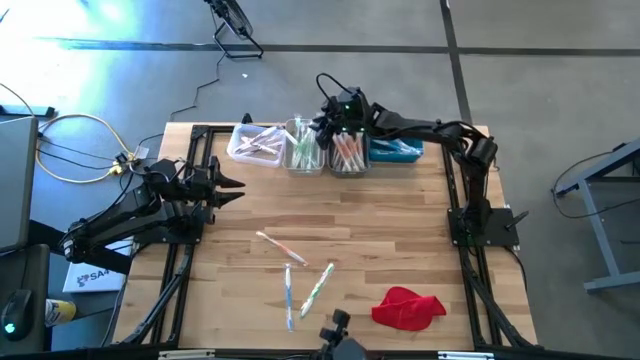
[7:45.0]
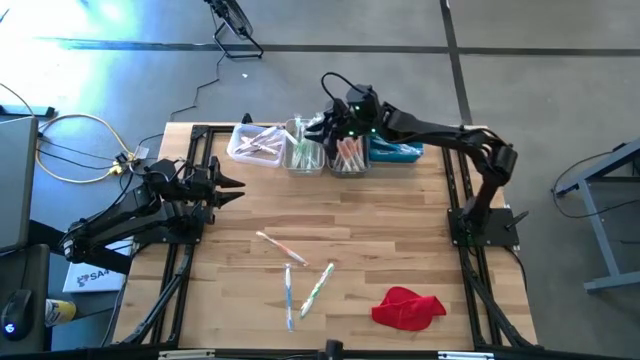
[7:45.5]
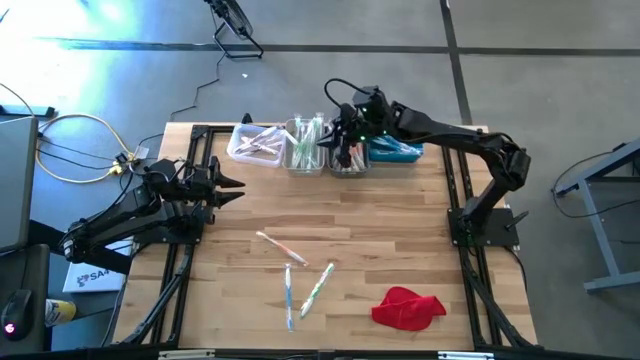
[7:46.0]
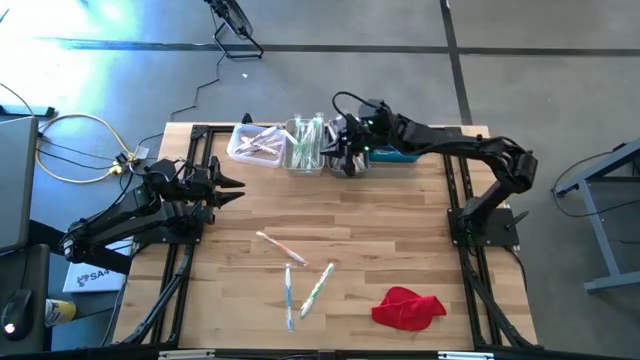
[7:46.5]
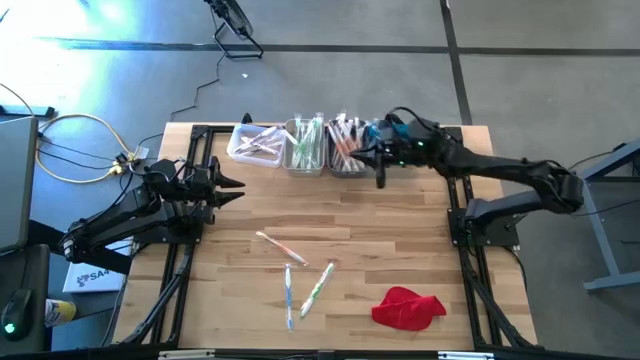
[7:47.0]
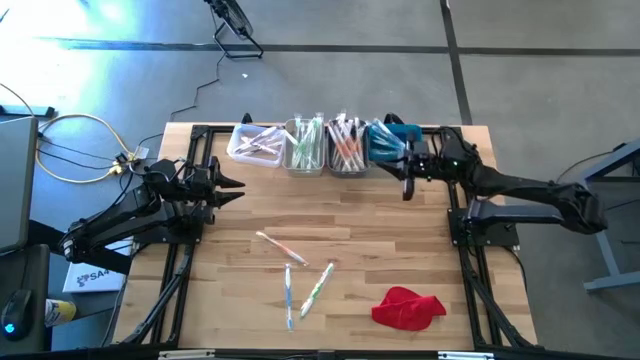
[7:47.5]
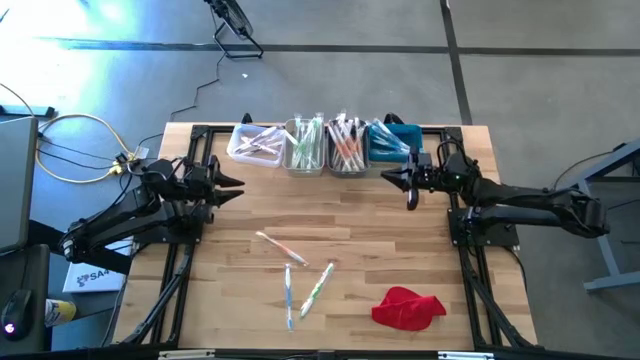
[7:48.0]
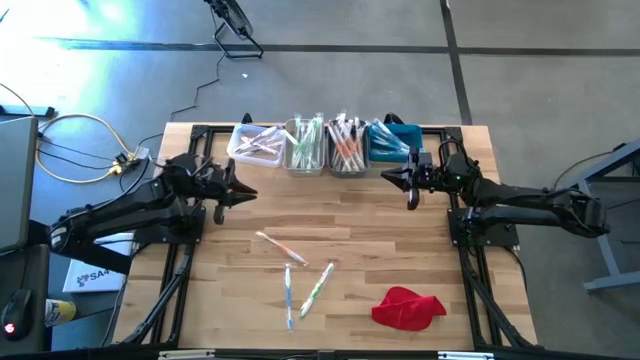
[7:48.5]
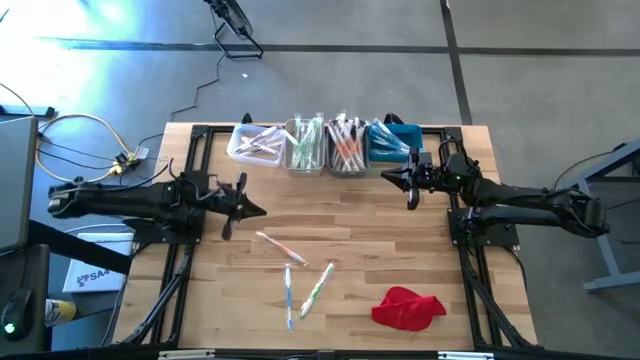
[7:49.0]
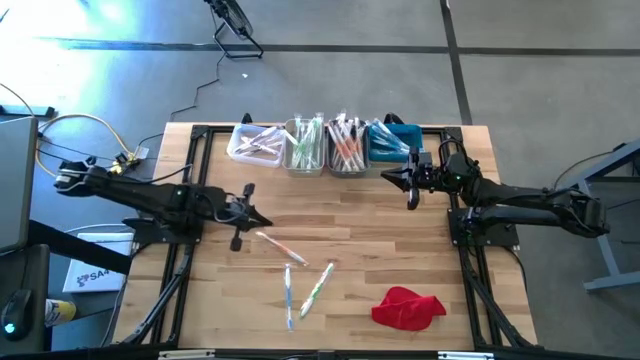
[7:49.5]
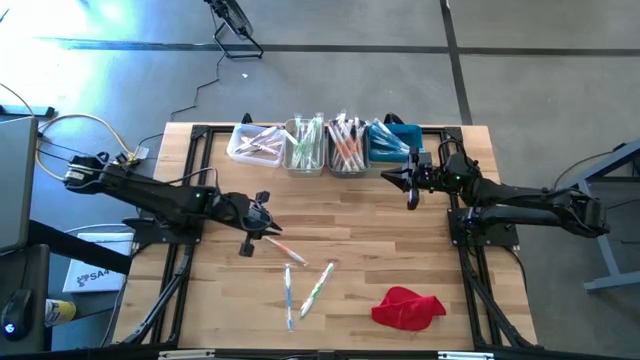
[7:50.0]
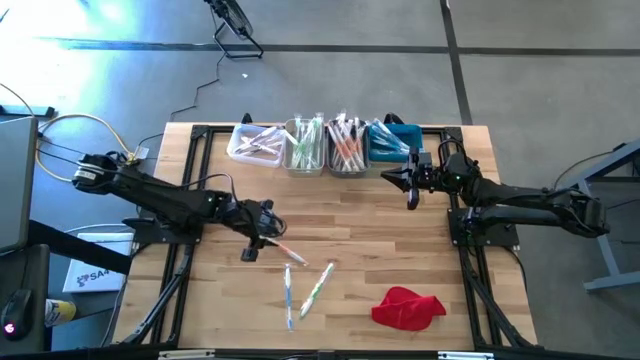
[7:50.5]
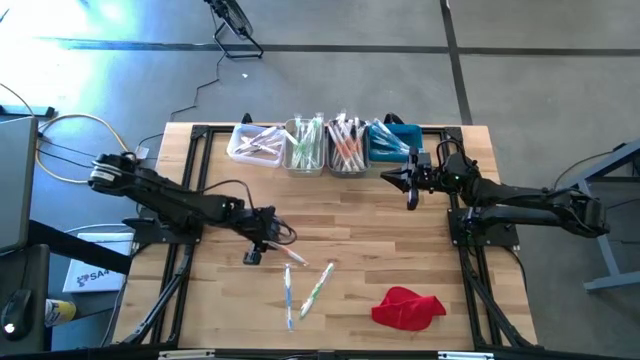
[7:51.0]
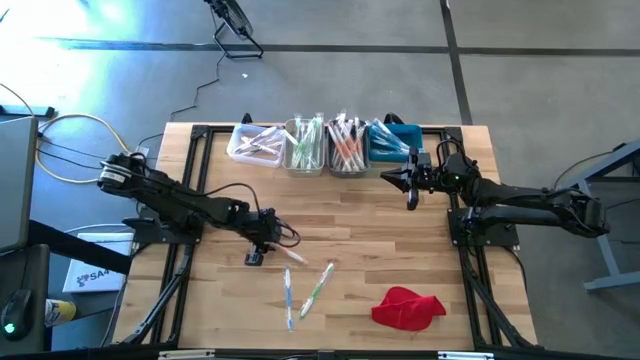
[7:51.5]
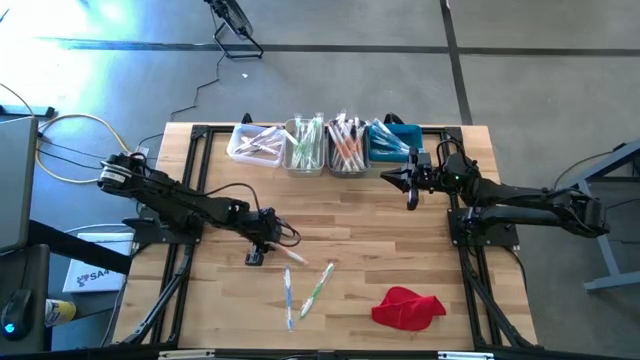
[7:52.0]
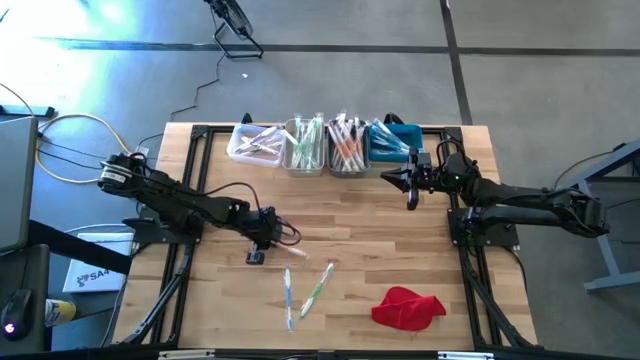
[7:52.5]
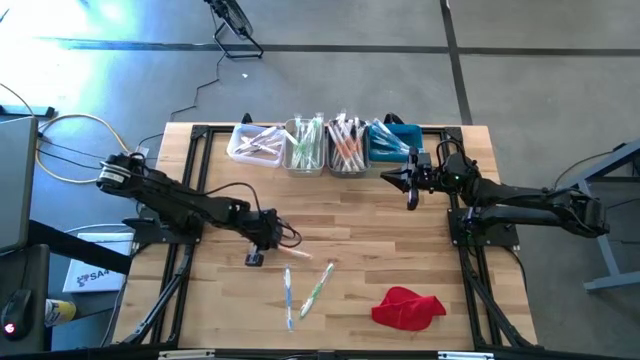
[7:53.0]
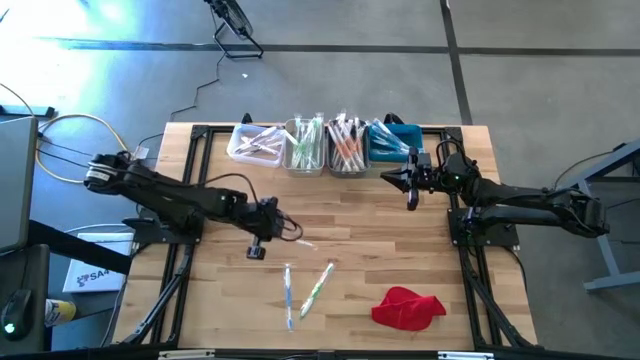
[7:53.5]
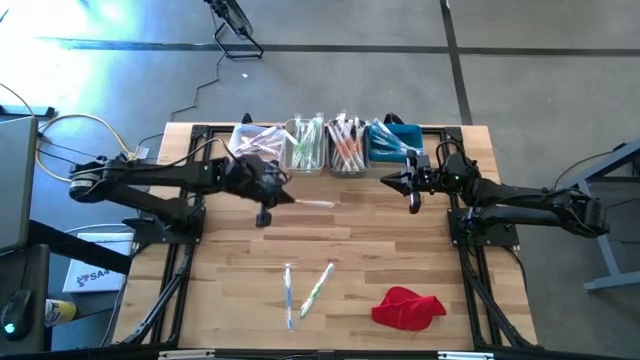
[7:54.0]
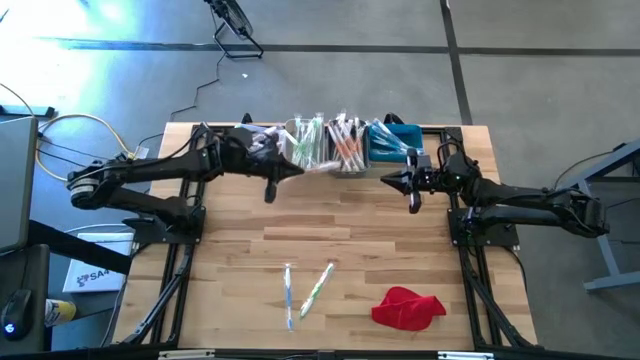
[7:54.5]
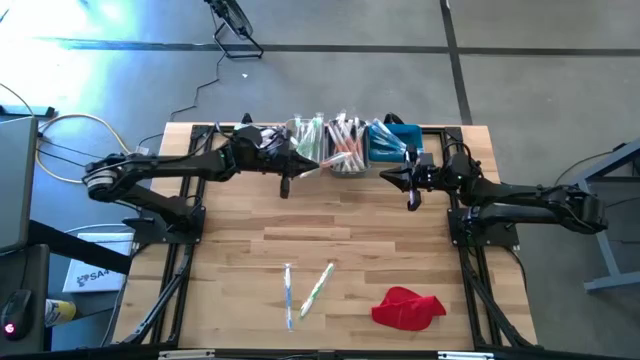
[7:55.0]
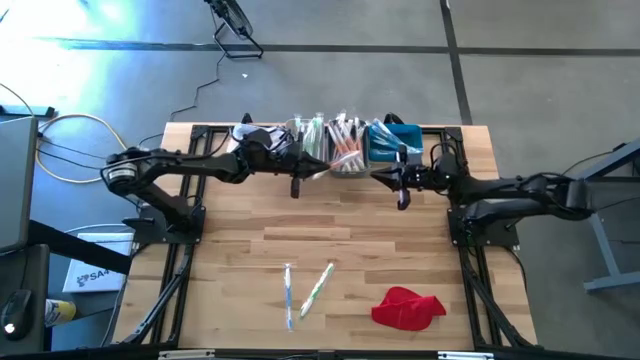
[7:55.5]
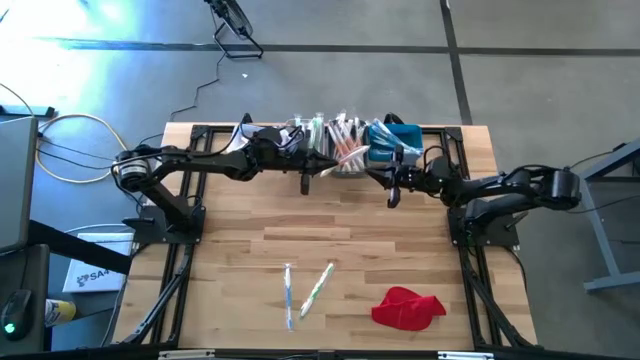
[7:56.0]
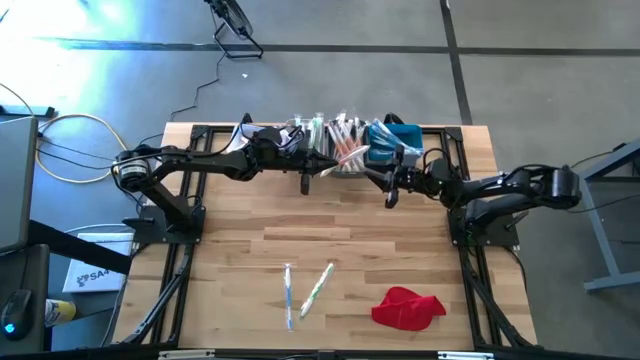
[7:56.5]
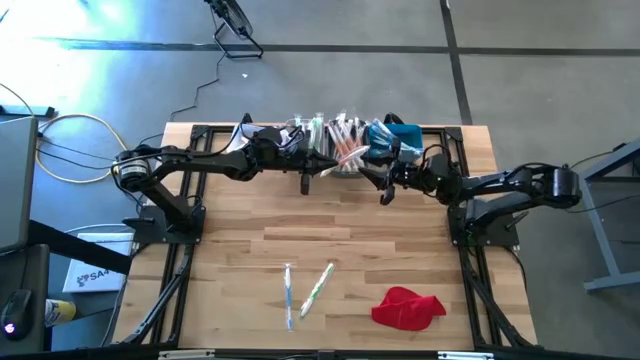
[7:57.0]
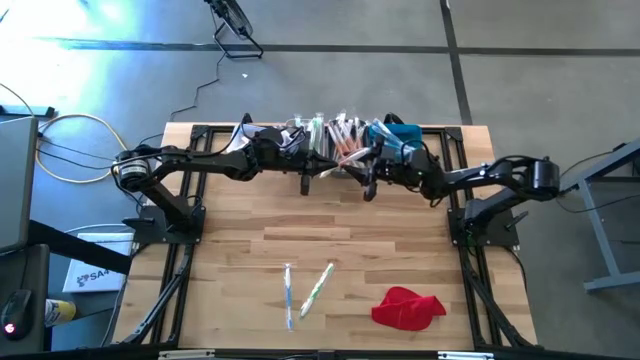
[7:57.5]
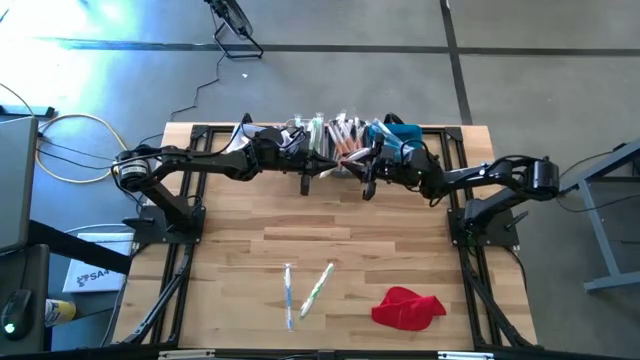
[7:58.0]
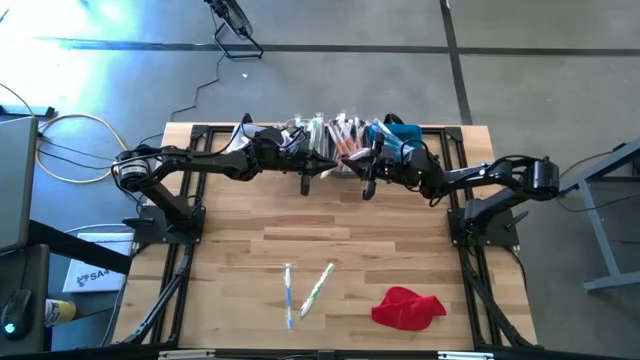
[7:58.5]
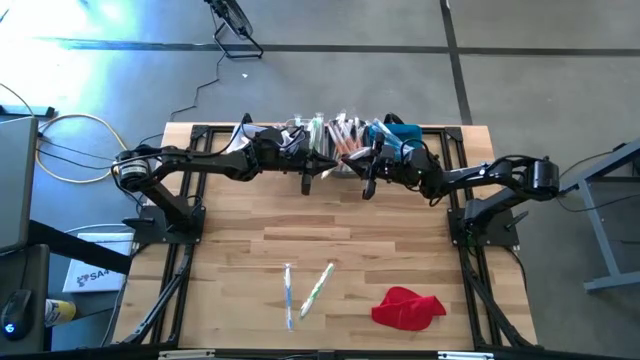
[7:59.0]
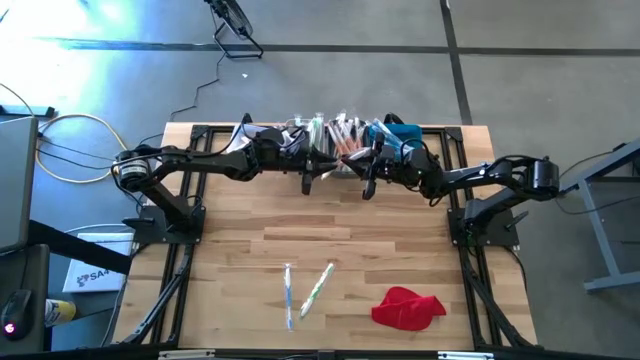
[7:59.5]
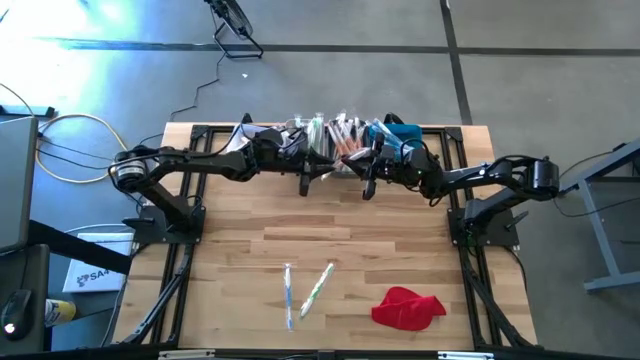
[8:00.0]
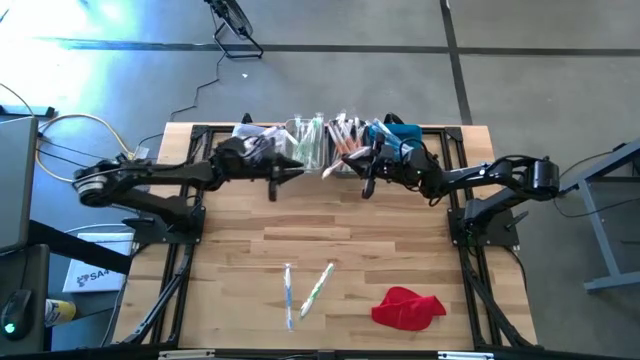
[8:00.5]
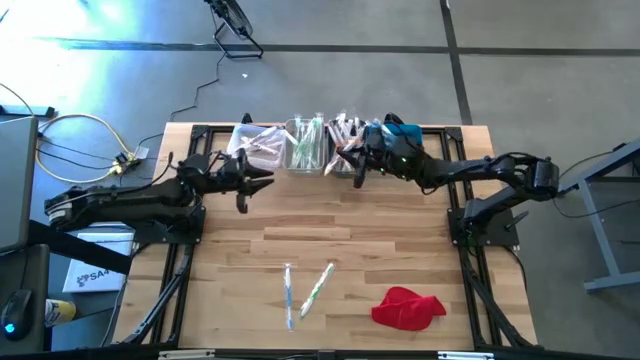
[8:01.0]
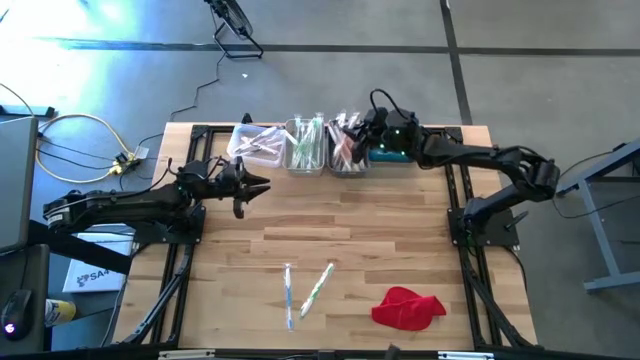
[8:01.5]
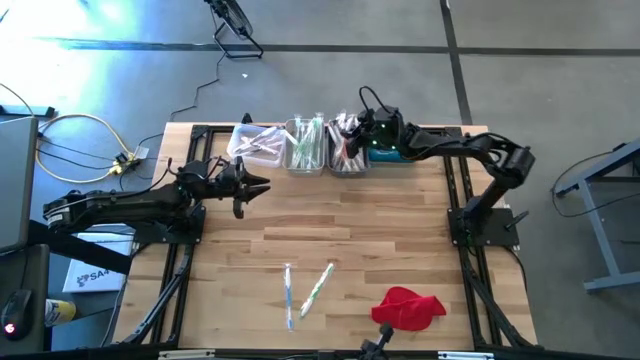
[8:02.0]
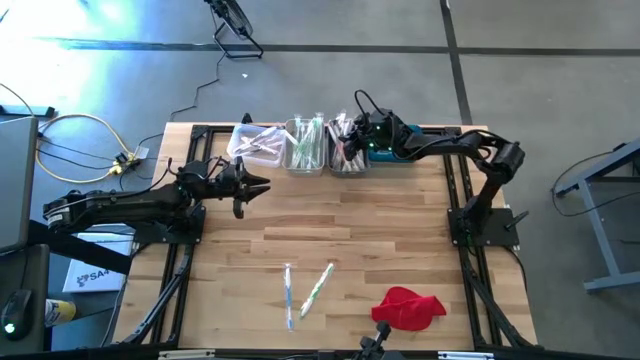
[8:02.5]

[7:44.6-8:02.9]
Task: Pick & Place Toothbrushes
Put the orange toothbrush into the dark green bin

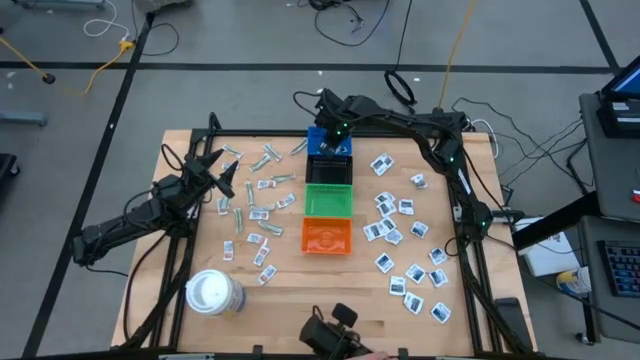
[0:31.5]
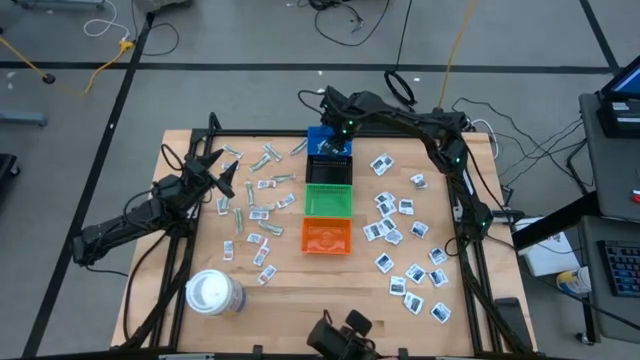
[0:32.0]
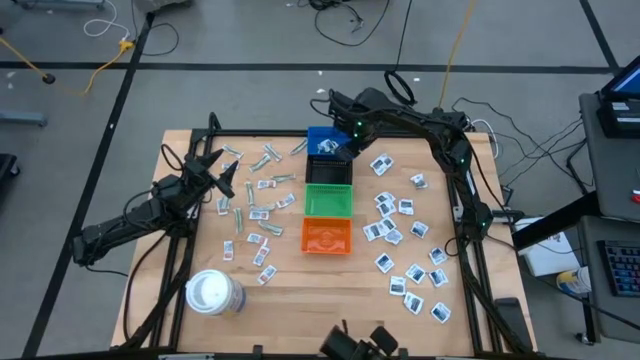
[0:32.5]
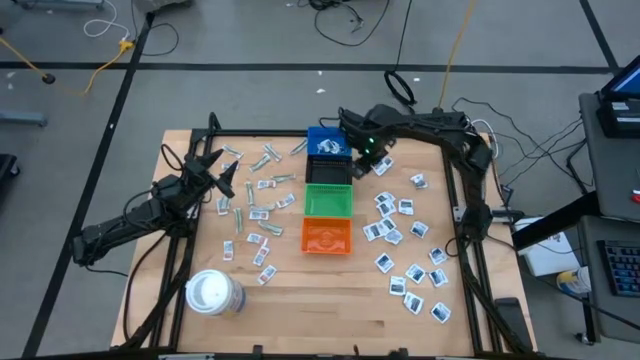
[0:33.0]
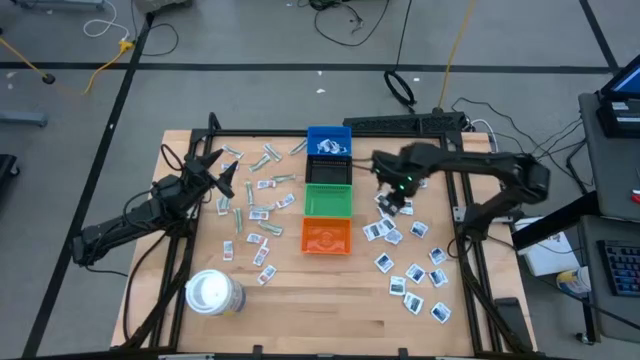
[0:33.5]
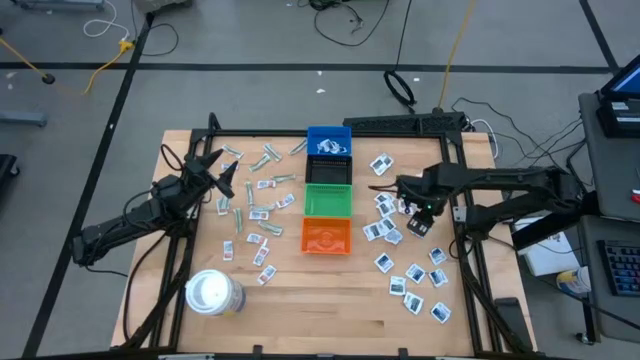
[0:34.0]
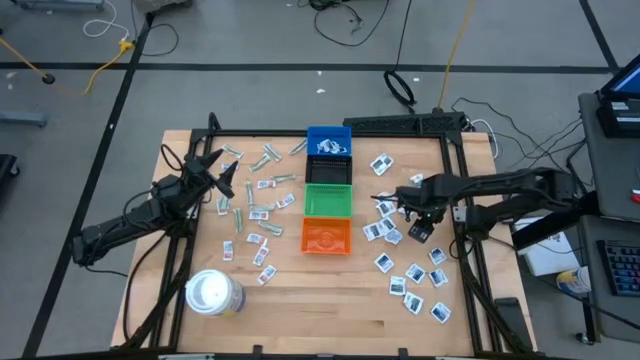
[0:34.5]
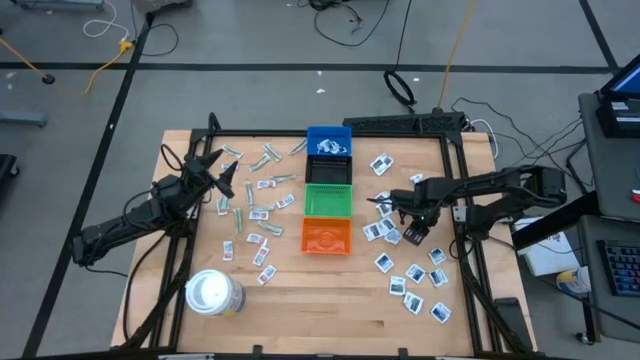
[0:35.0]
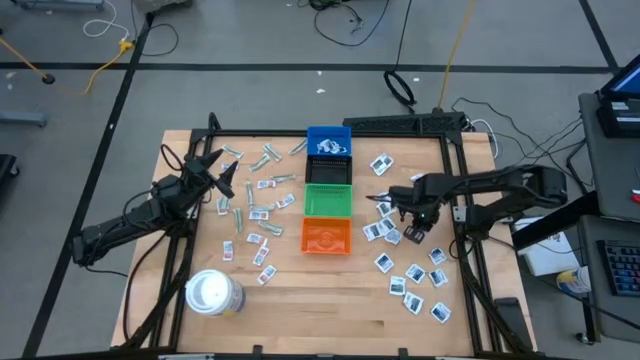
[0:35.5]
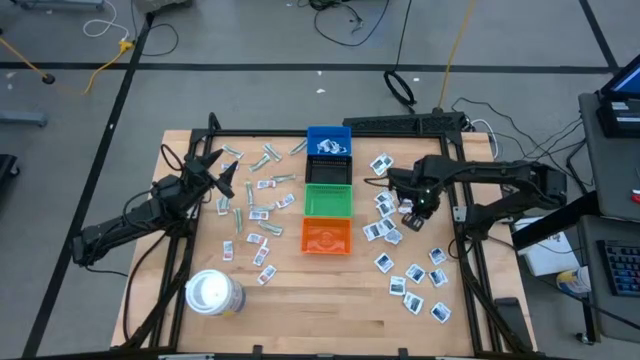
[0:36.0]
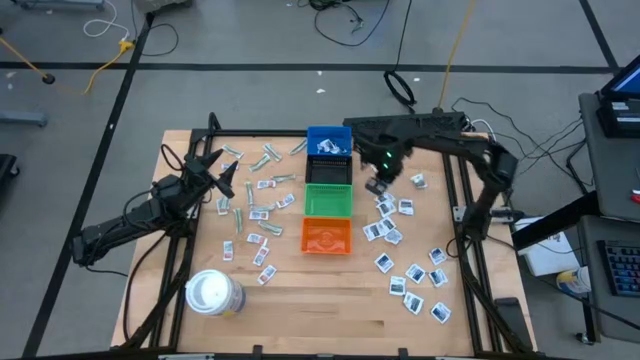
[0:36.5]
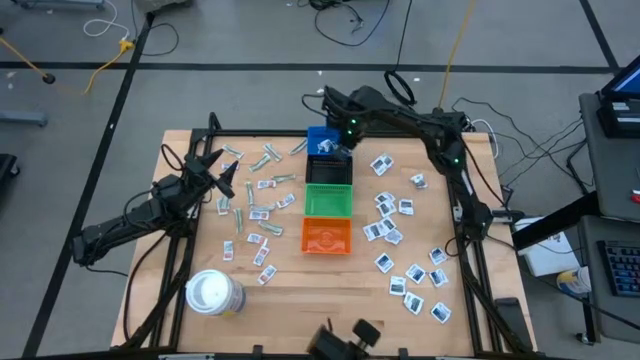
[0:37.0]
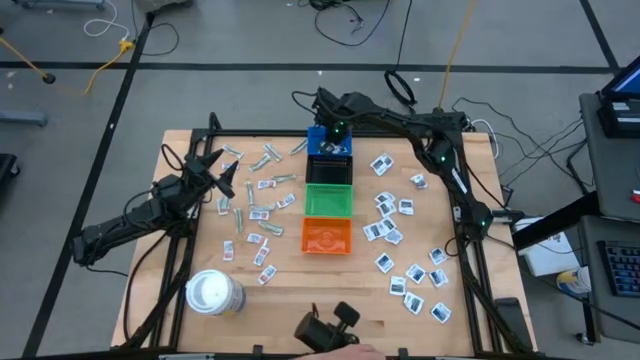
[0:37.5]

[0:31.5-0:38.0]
Task: Pick & Place First Aid Supplies
Put the blue alcohol pad into the blue bin
